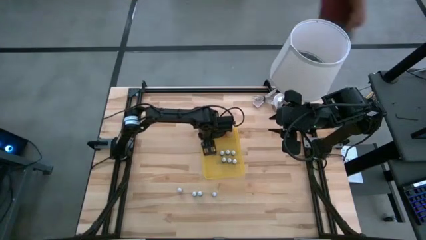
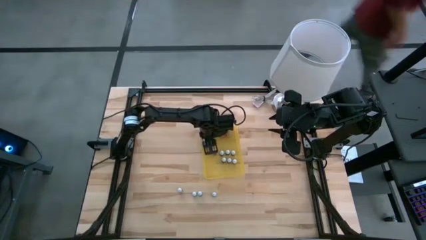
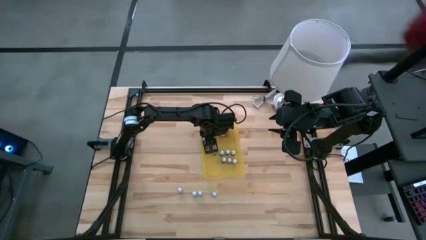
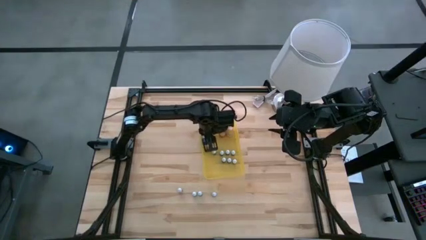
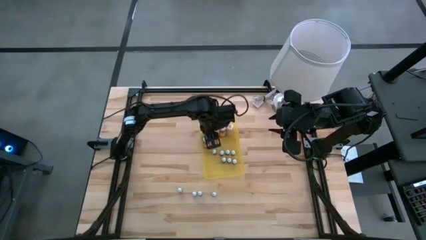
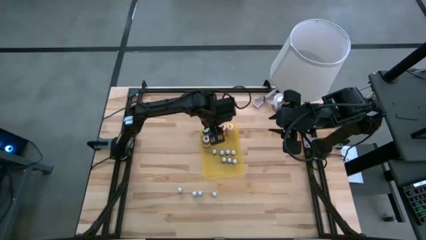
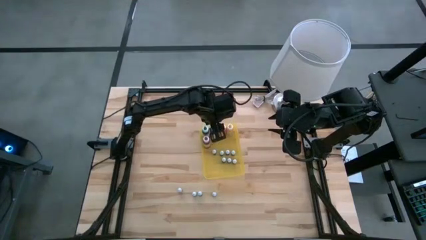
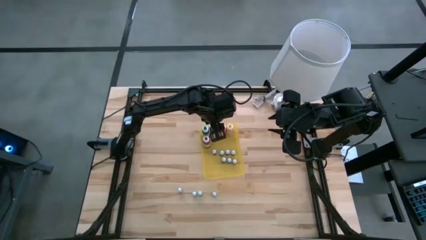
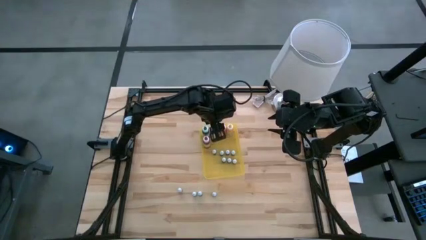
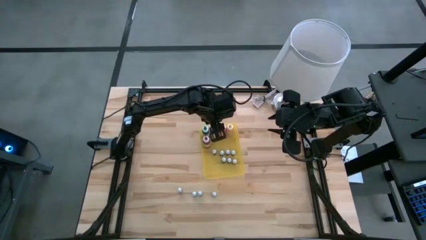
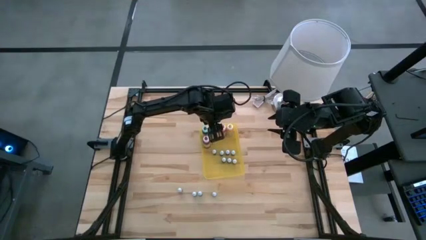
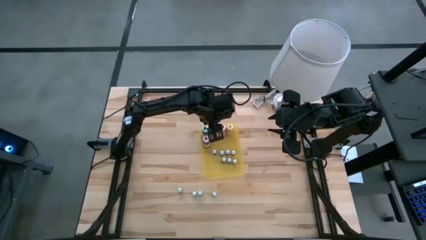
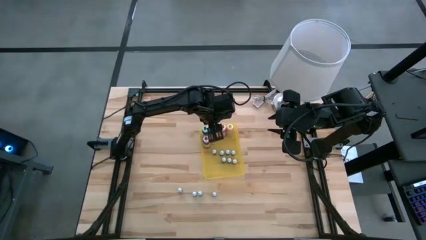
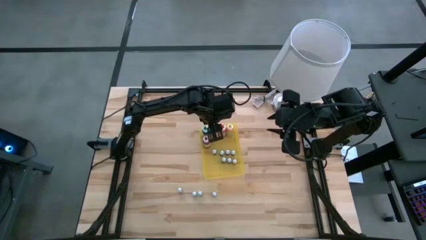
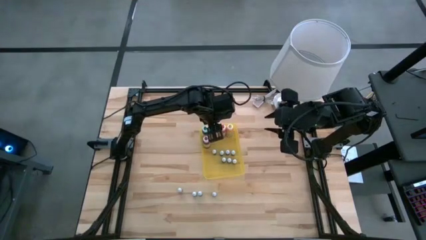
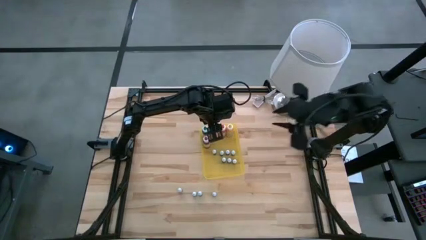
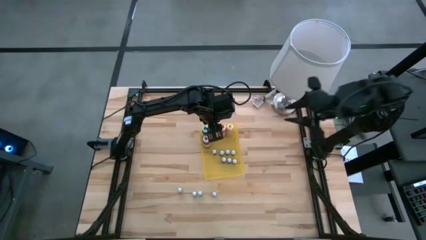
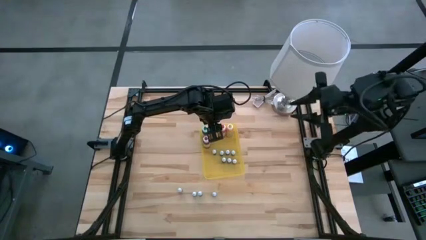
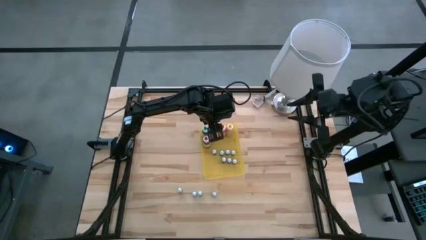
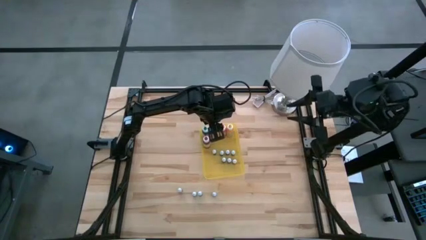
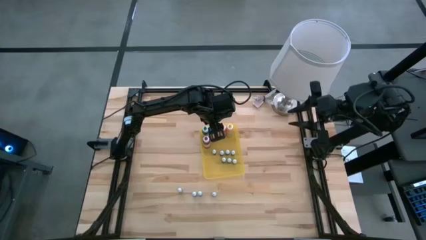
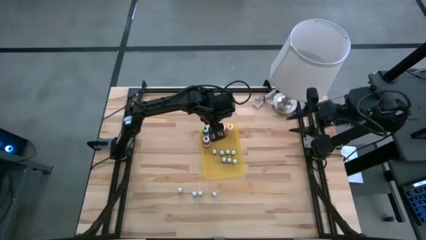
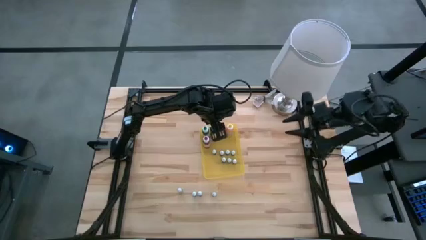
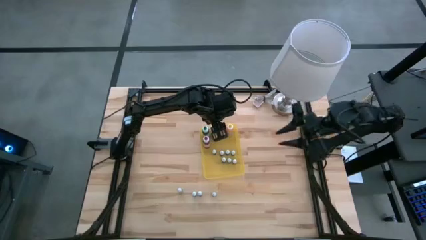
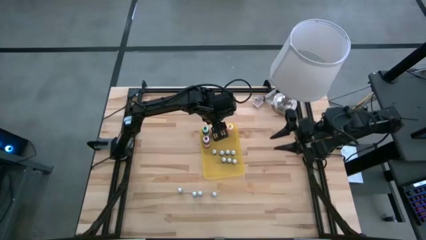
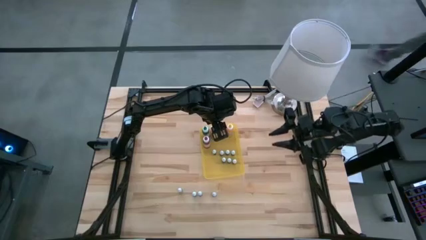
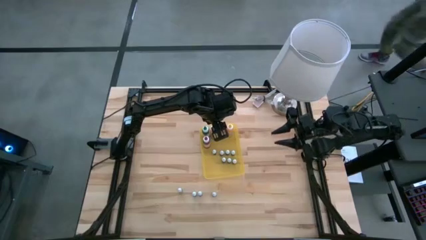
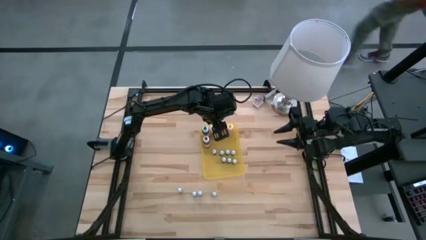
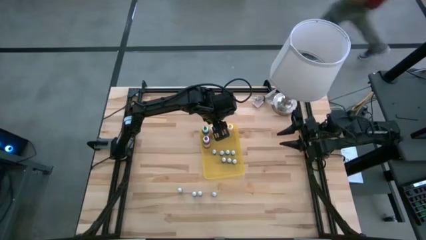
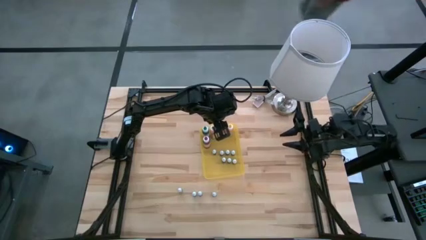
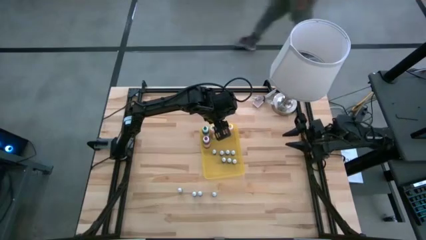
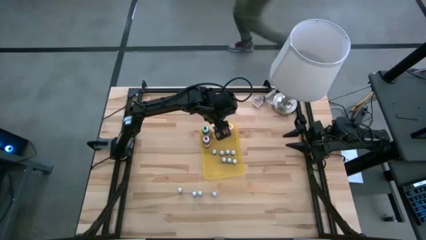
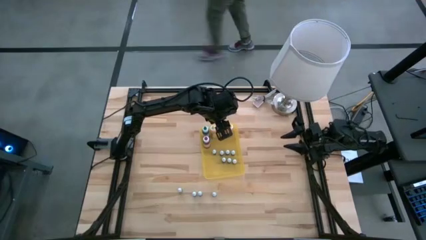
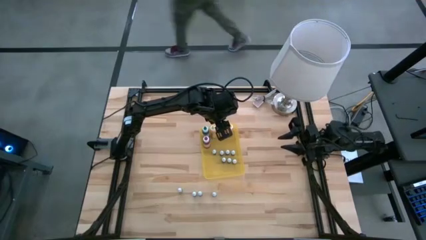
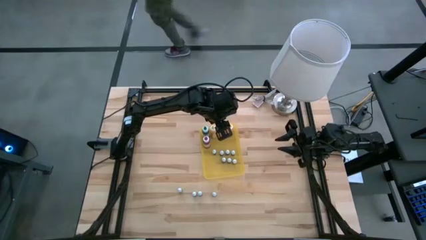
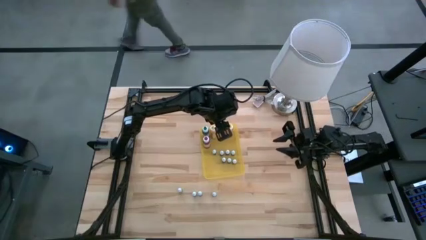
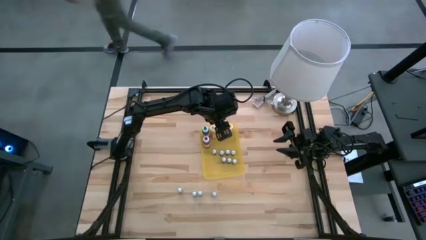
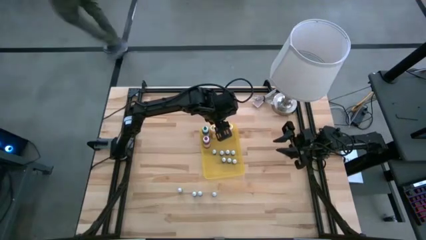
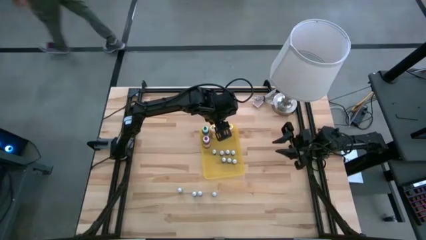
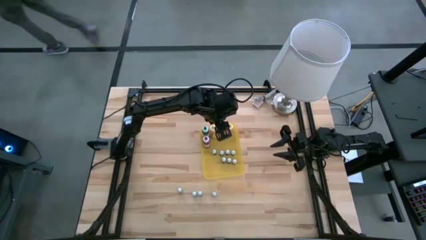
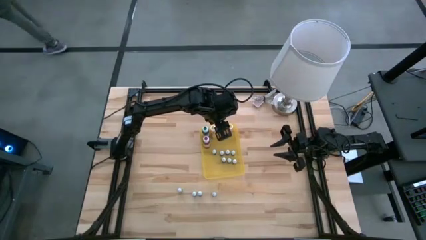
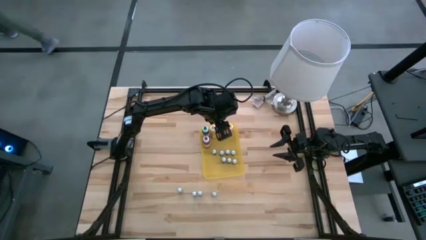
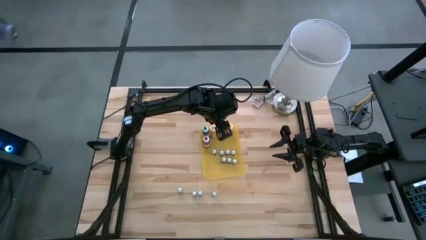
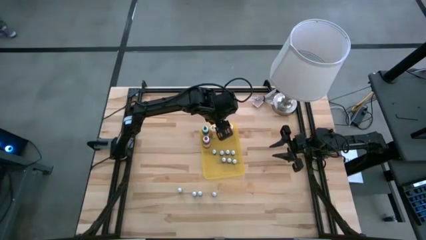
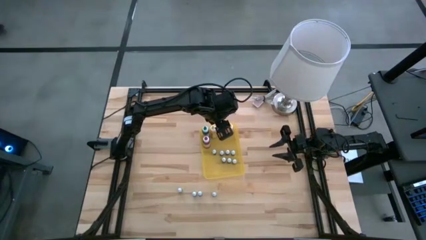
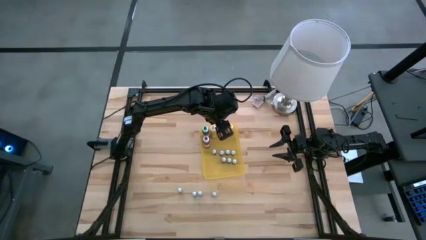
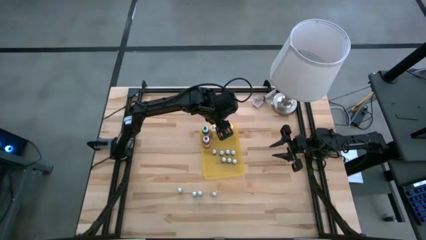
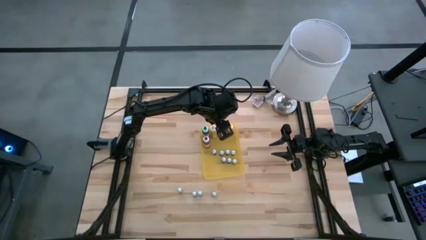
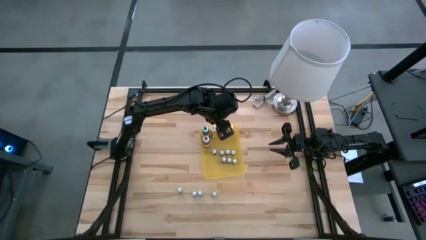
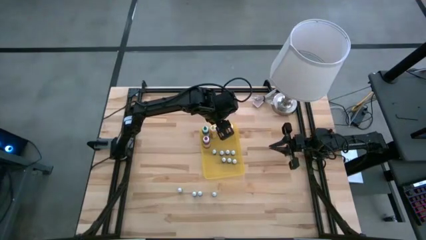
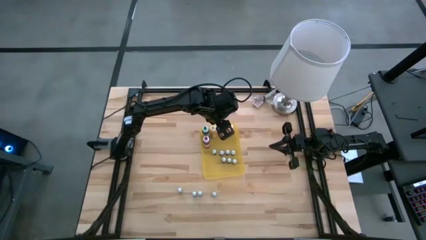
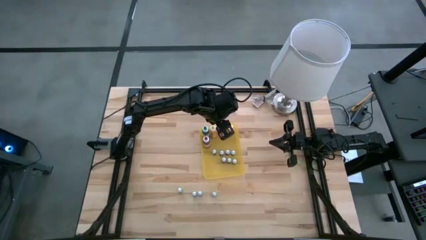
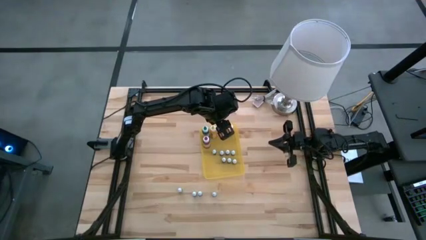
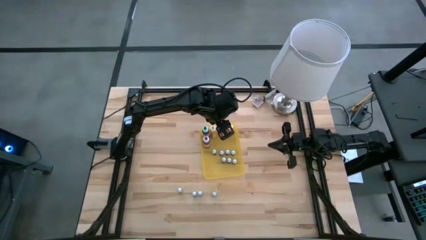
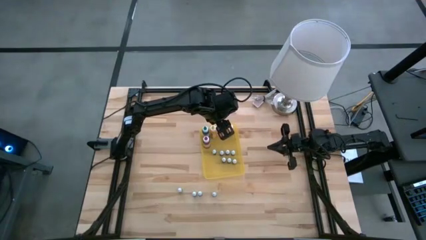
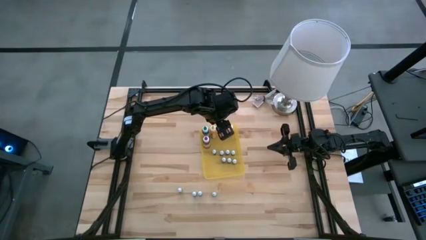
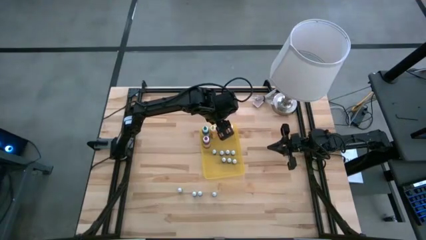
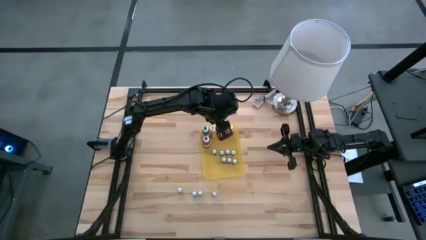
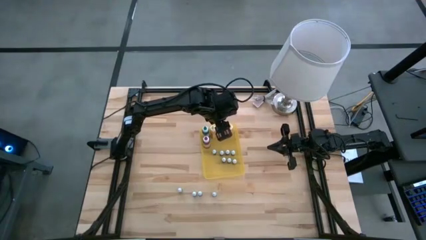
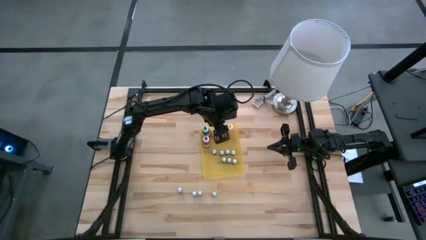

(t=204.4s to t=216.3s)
Task: Pick & Place food coloring
Put the small black food coloring bottle into the bin

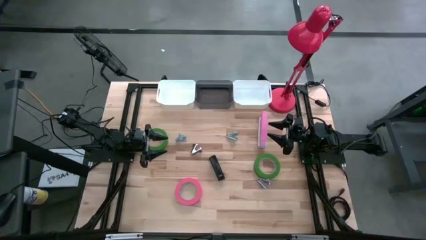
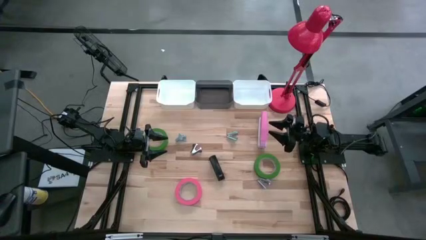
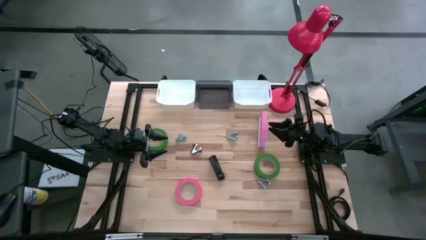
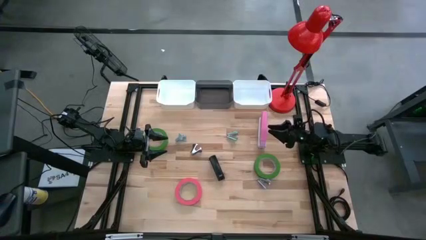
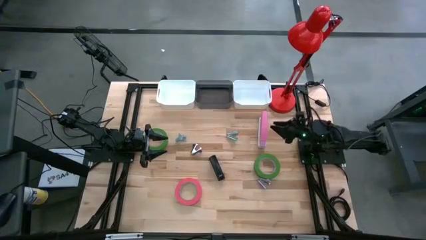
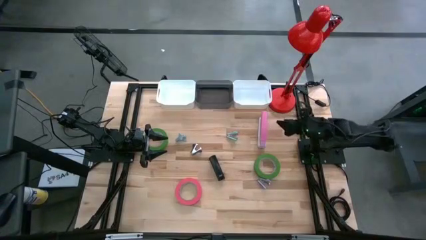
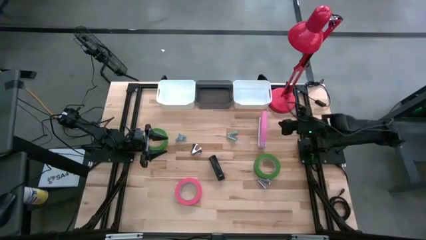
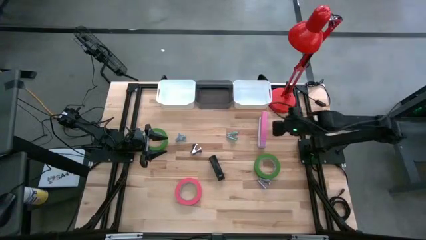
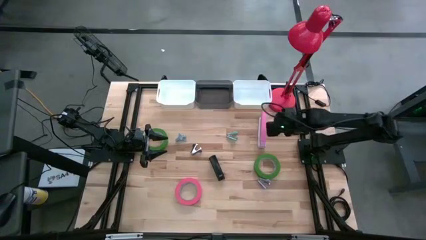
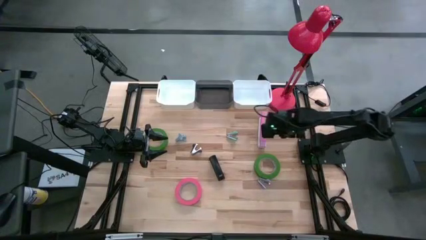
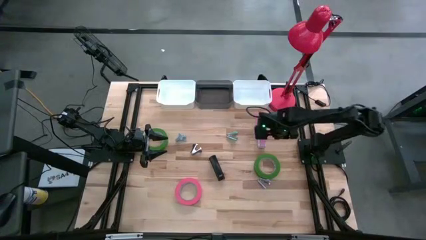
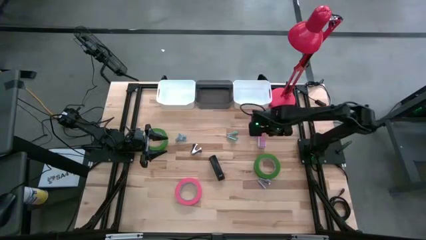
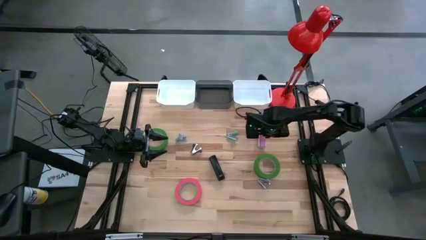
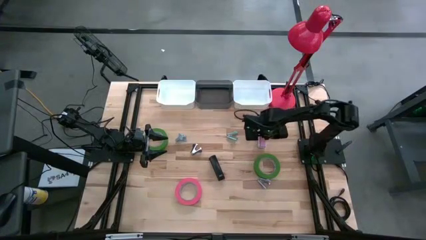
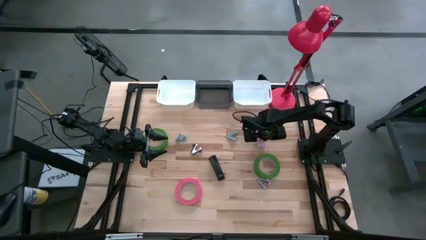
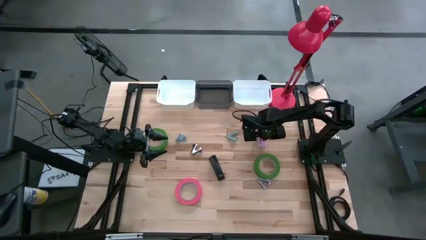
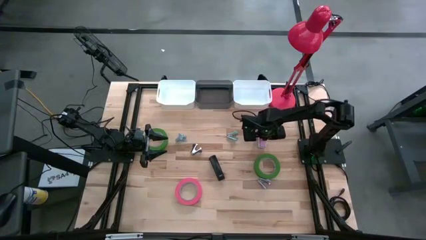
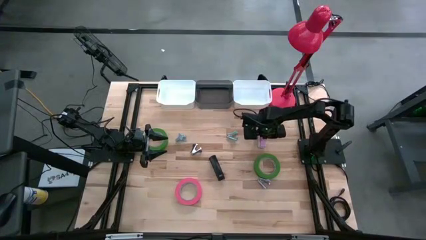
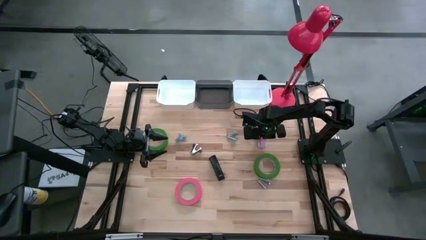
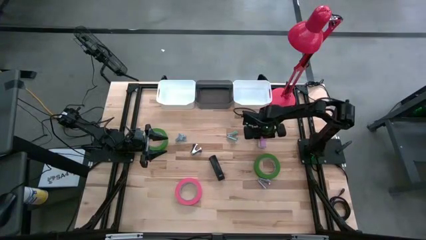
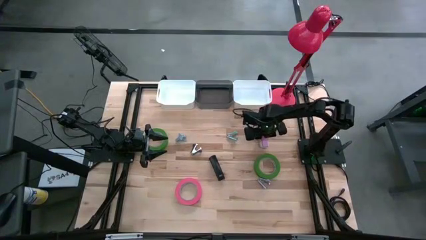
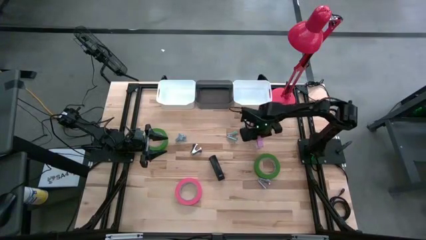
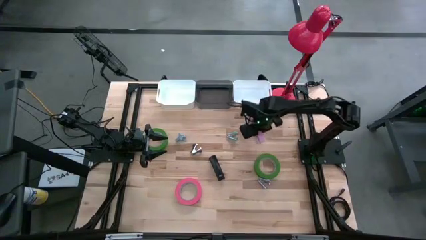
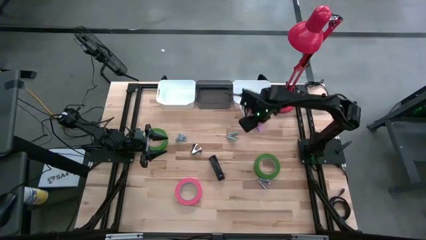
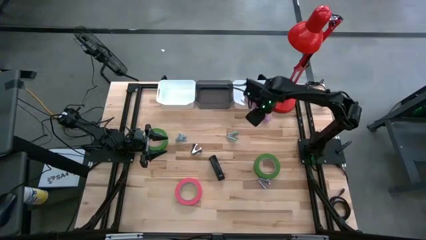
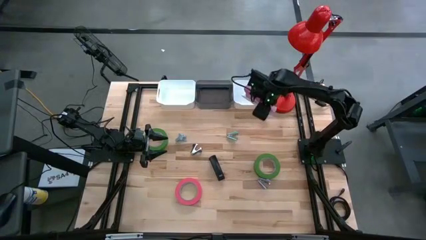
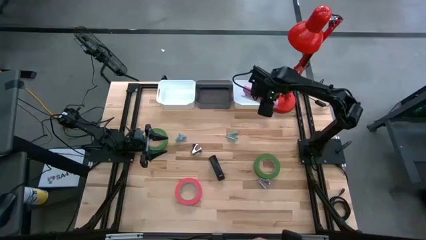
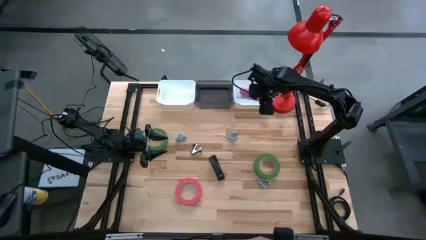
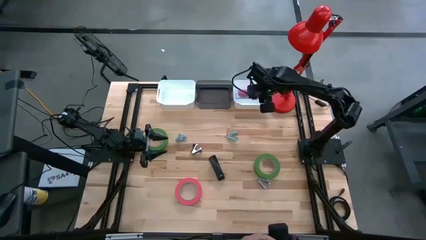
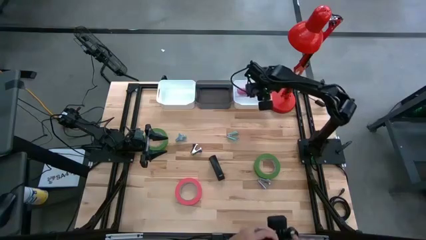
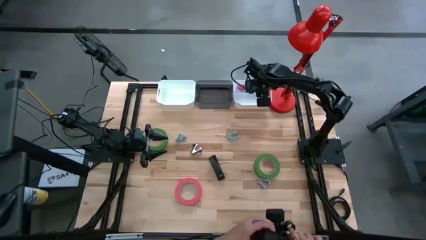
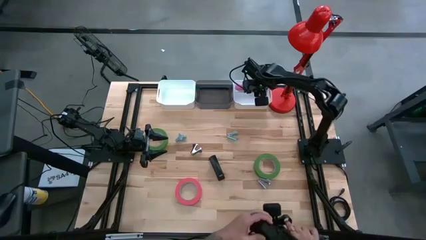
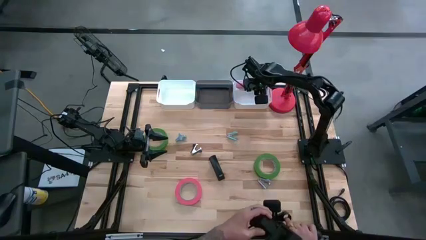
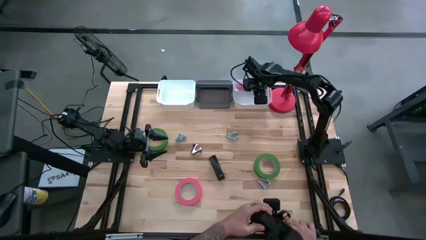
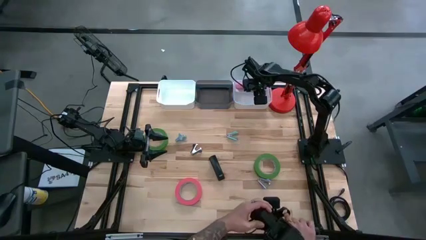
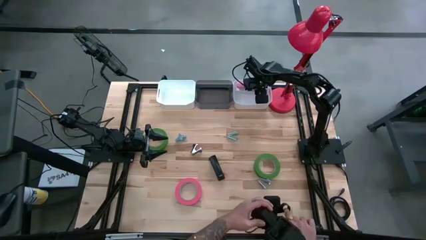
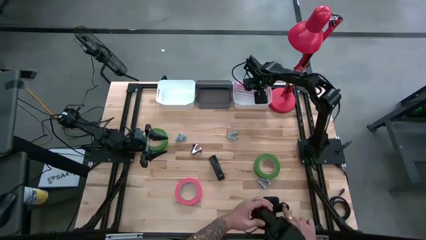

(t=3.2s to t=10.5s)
Task: Pick and place Stapler, Stapler remover, tape
Put the pink stapler into the right white bin
